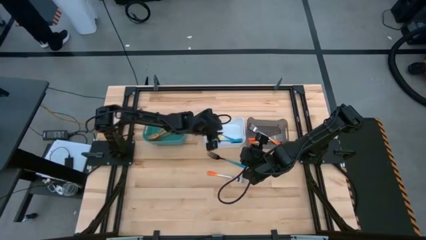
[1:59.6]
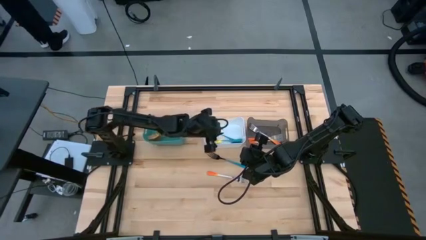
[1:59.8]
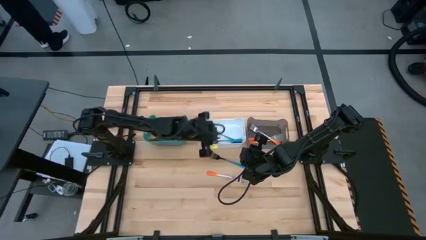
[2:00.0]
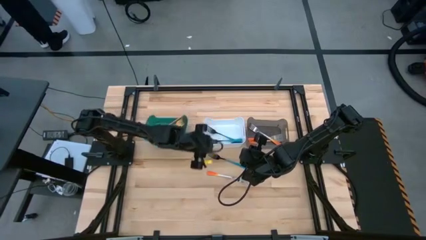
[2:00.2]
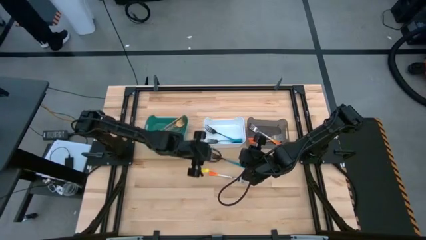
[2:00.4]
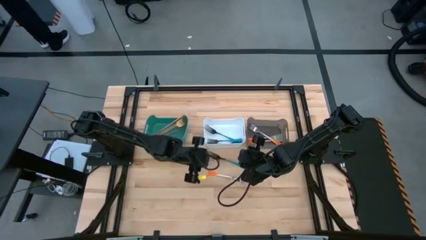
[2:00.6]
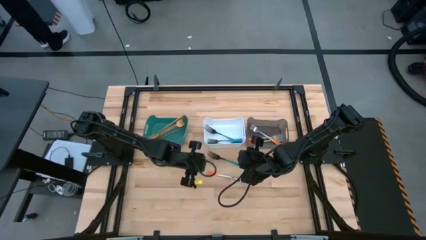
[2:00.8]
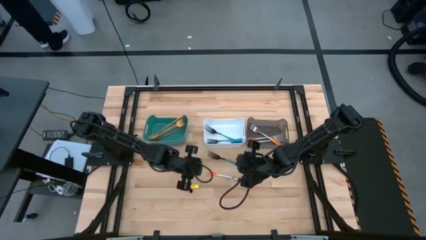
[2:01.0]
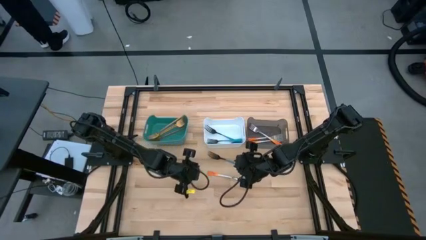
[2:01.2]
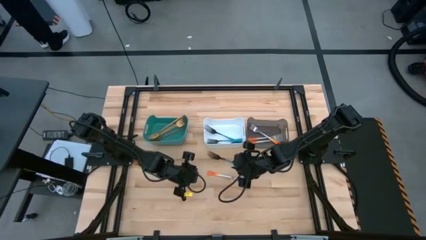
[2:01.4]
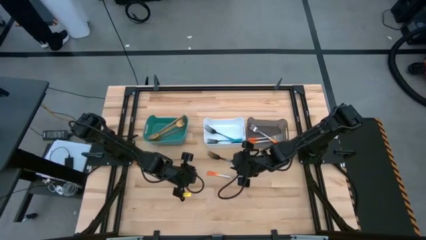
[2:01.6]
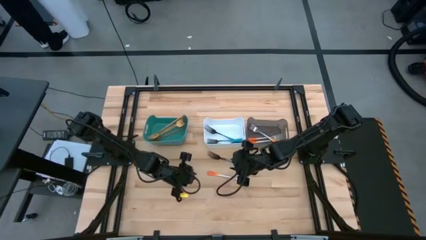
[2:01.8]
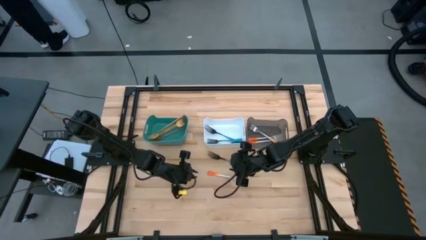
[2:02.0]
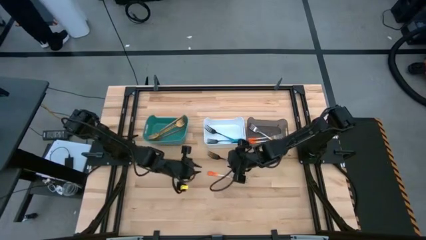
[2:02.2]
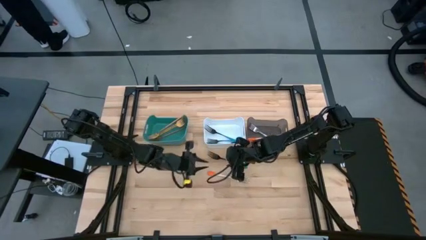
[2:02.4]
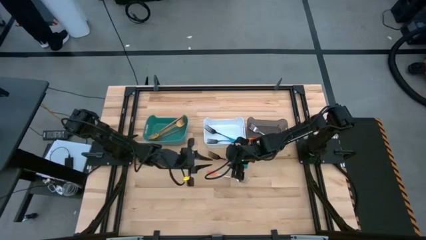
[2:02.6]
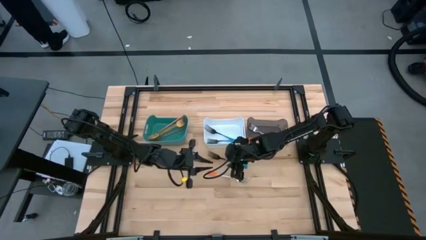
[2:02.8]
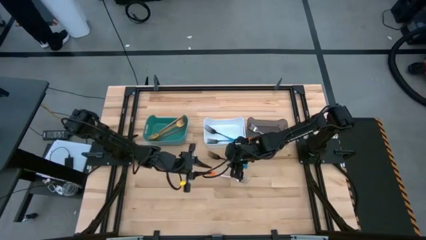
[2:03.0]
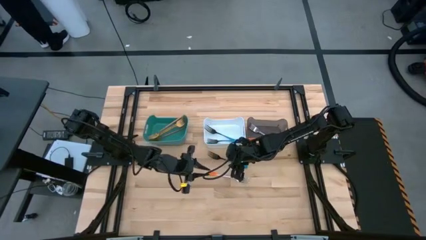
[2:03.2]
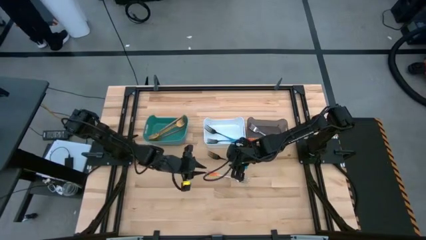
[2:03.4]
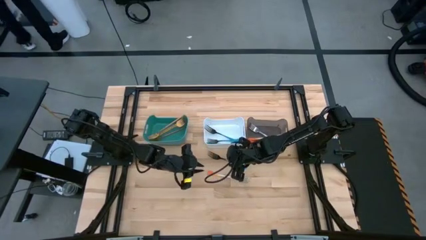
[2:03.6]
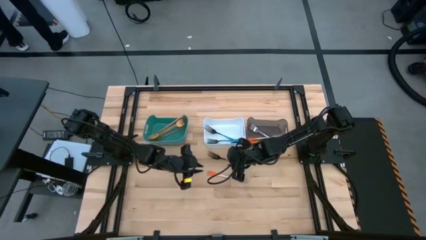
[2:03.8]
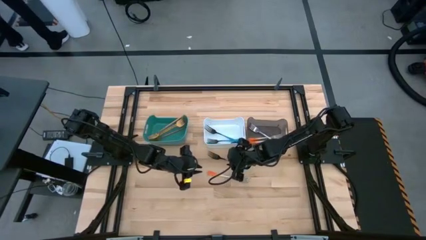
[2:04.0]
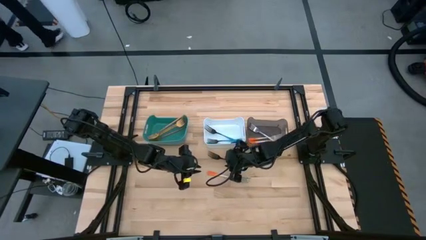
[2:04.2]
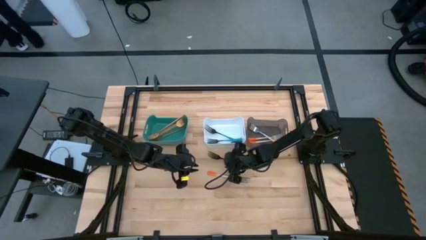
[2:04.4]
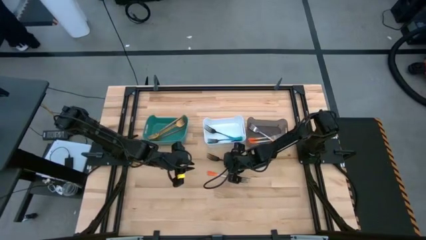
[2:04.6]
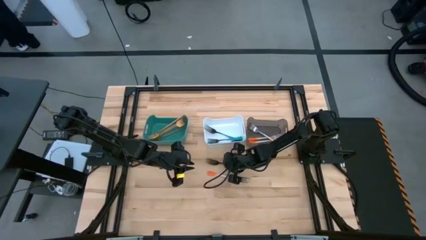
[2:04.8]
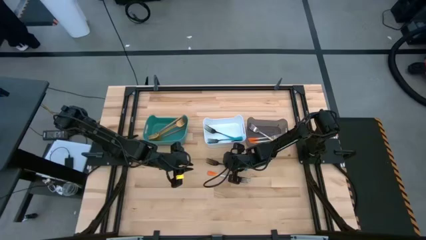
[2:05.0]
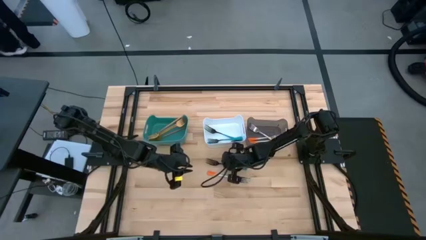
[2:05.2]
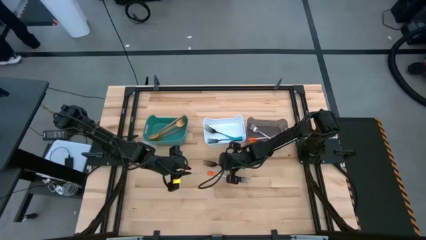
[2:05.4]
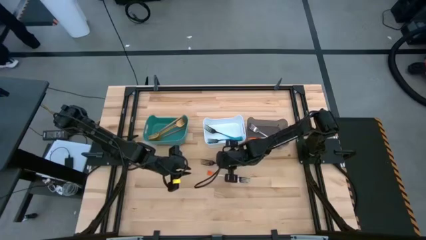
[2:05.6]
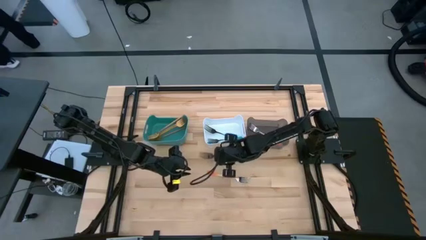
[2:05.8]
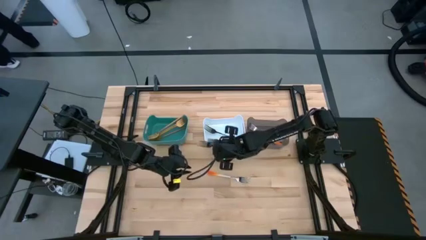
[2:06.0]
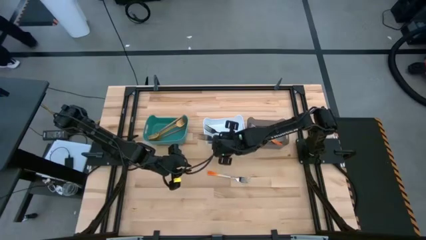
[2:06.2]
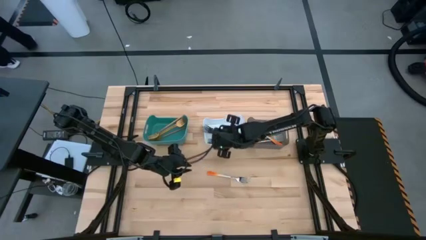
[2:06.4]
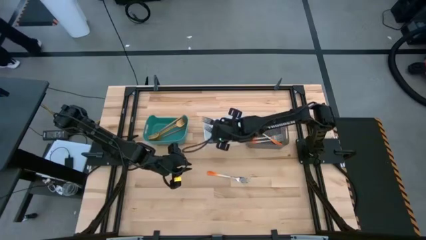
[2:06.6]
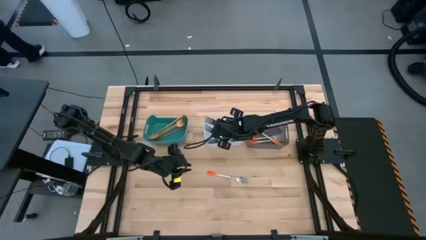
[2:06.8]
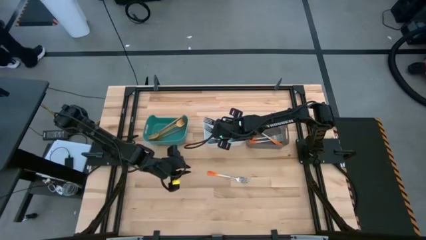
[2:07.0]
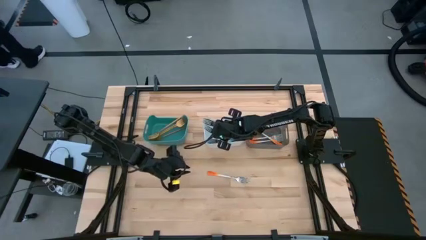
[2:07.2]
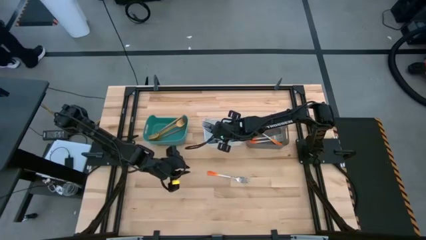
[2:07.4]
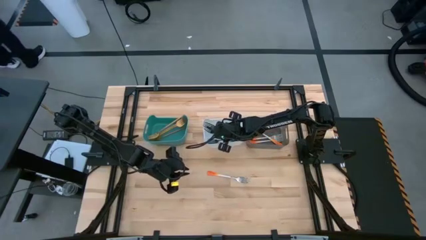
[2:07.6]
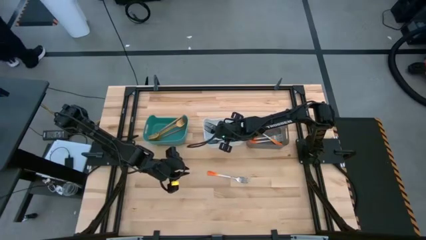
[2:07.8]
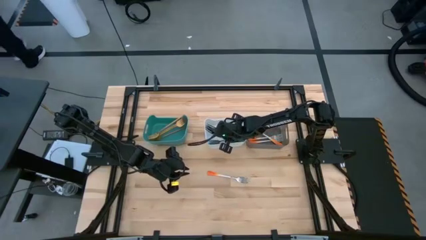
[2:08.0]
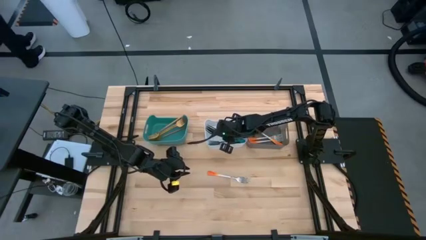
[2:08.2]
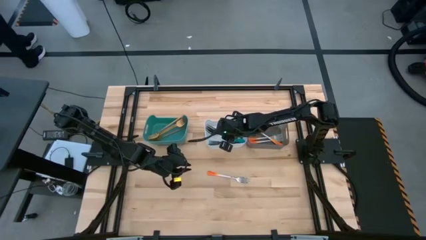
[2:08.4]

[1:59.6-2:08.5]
Task: Sort silverware by color (type)
Put the blue fork into the white bin

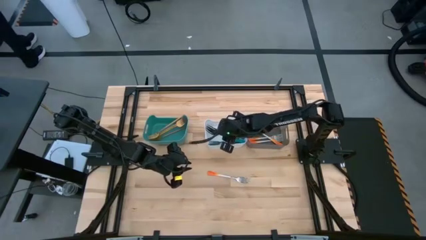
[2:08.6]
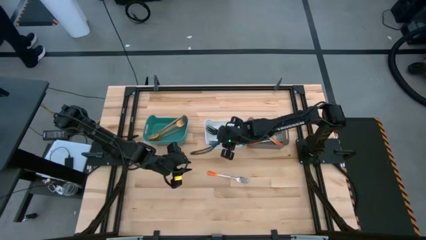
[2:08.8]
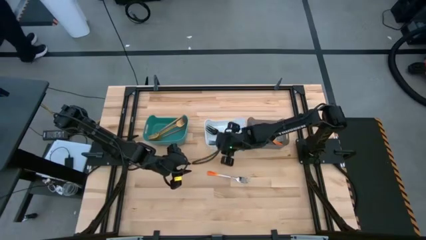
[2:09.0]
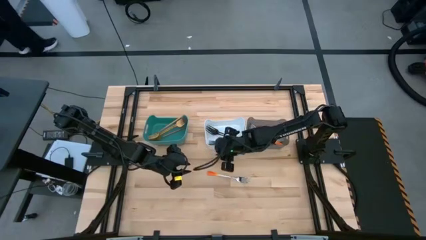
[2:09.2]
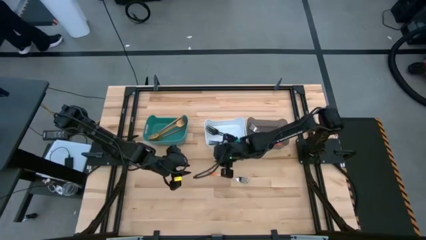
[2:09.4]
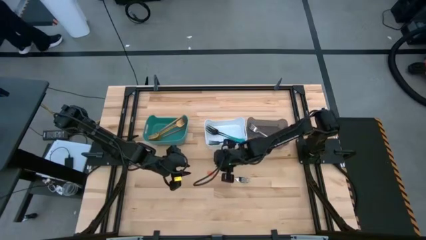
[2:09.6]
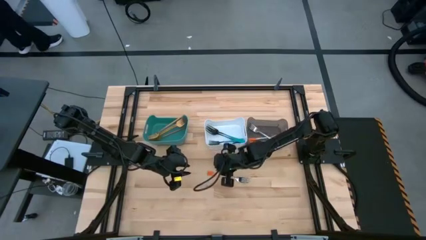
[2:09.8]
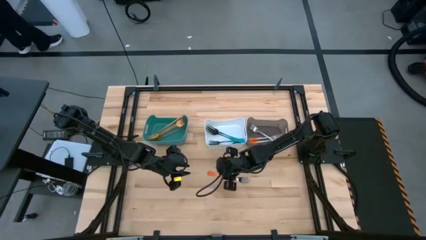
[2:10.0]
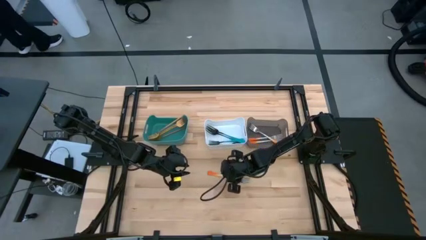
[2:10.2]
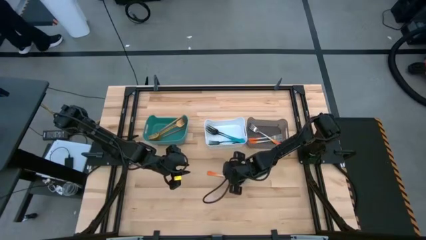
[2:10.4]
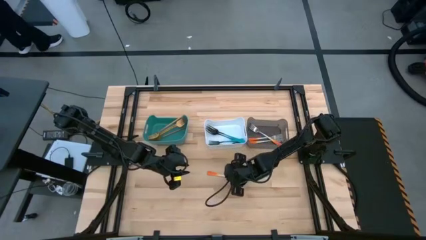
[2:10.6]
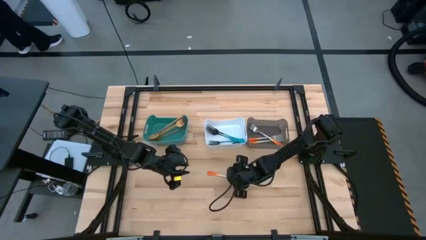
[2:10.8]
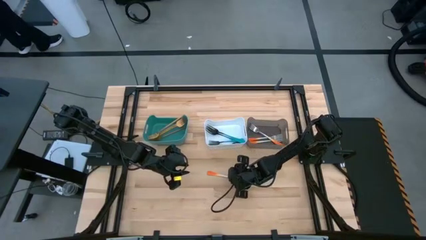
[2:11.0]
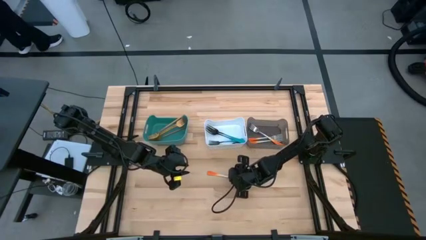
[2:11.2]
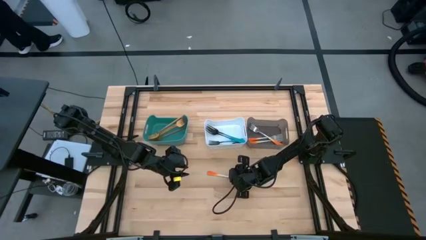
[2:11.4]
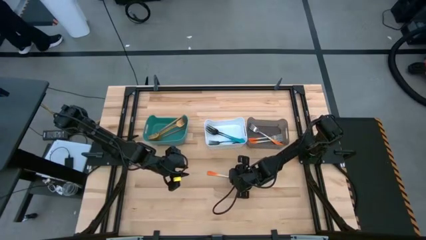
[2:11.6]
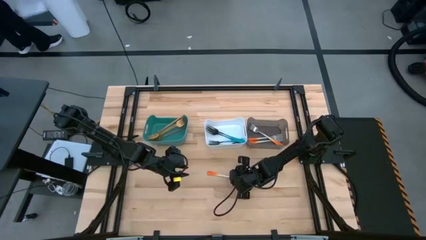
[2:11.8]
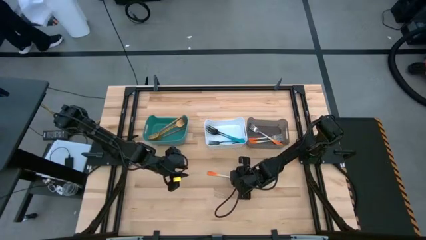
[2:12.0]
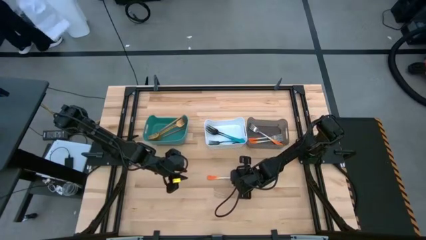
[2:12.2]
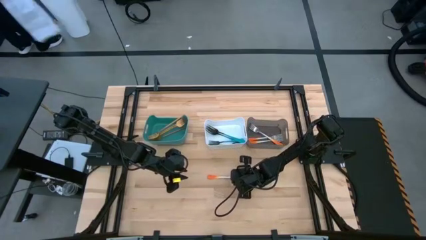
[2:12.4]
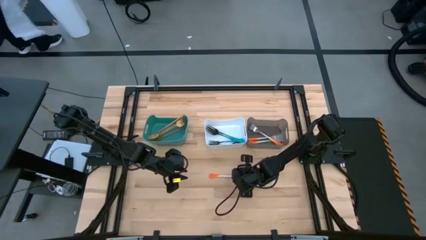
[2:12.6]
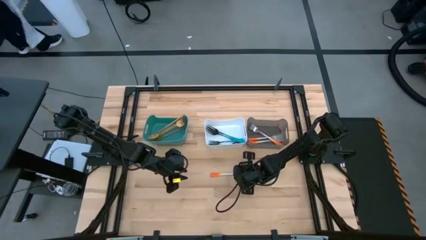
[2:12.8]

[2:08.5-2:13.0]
Put the orange fork into the transparent black bin

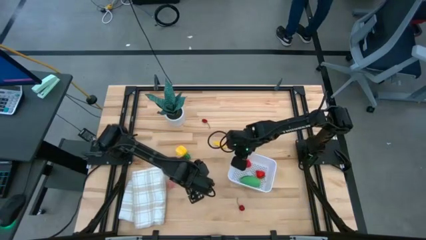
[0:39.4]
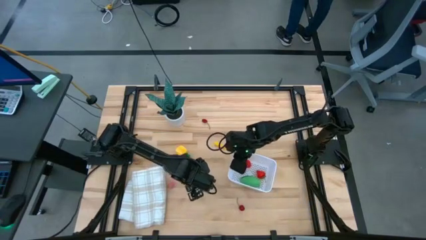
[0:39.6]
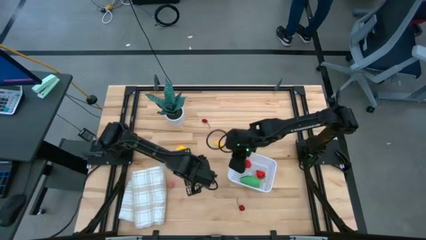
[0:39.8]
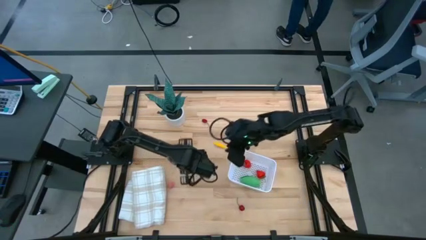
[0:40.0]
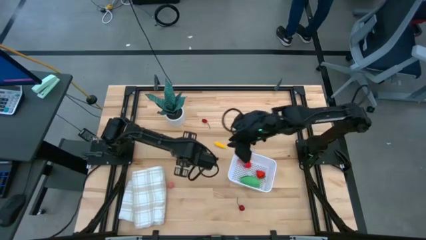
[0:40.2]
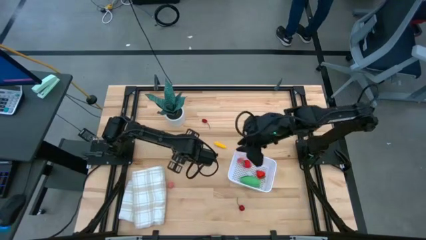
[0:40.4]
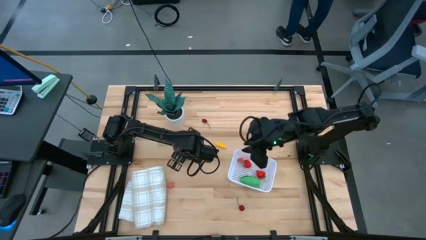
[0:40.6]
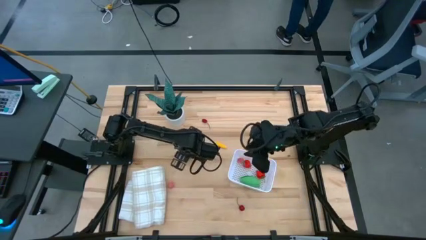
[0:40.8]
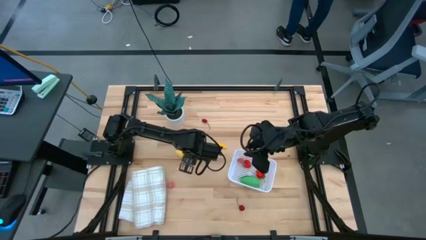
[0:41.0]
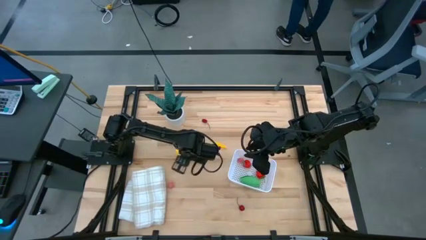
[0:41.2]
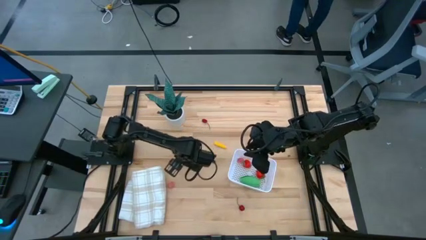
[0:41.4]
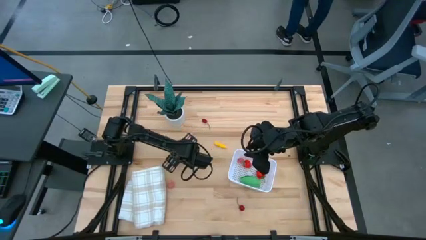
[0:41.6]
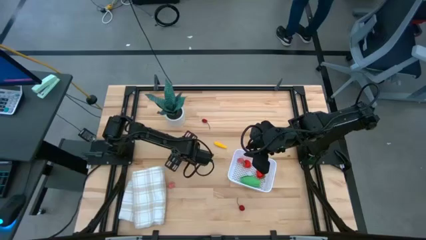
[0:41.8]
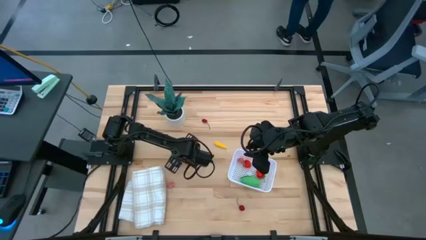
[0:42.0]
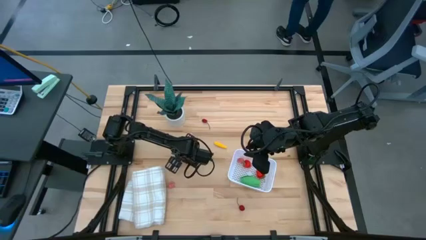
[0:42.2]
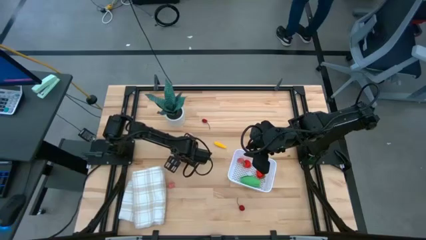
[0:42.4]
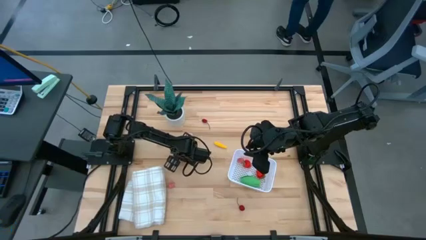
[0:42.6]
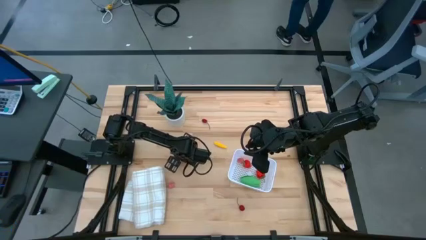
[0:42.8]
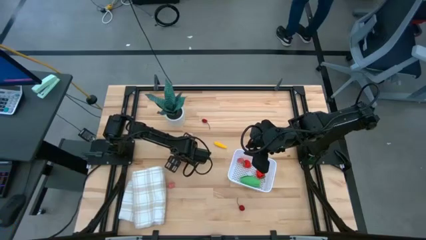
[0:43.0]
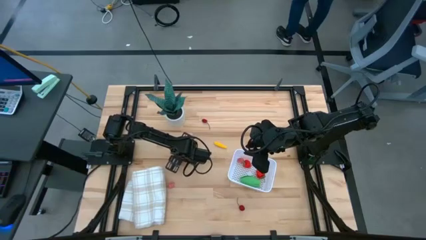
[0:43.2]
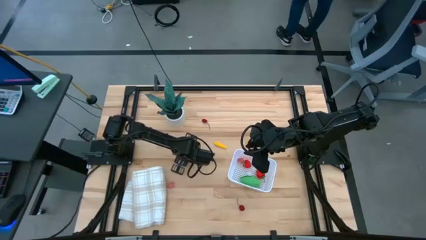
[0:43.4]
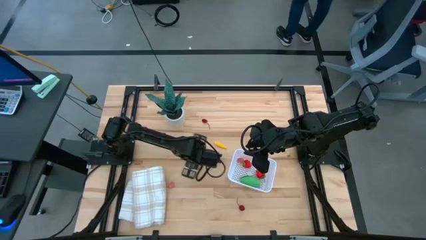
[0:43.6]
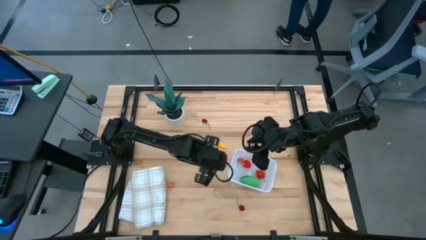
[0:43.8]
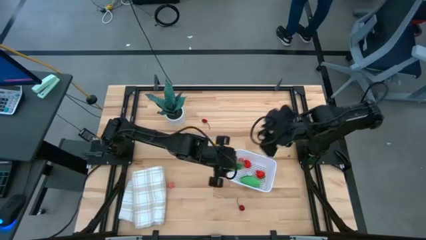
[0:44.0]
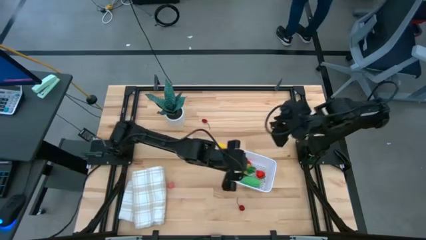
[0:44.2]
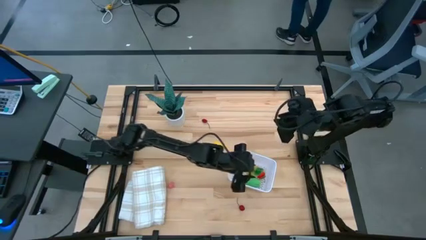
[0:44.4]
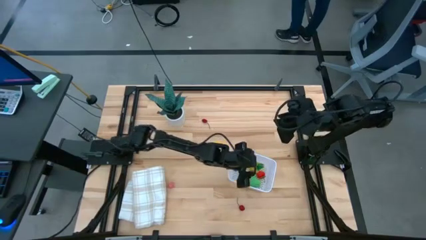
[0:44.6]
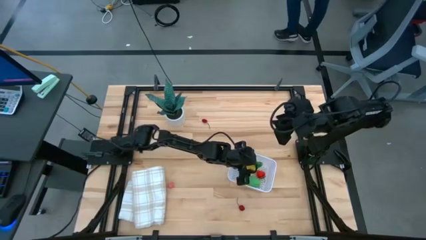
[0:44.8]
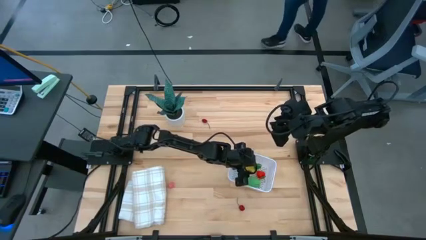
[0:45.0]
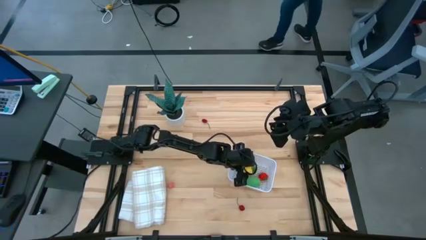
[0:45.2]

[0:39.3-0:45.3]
Task: Pick and placing Produce into tupperware
Put the yellow pineapple into the white basket
